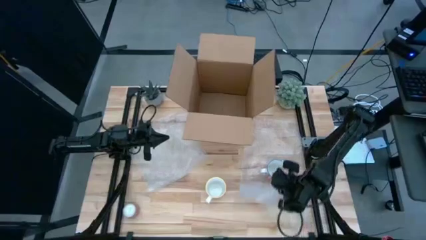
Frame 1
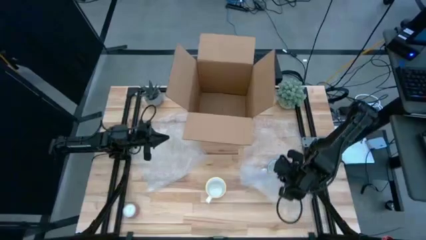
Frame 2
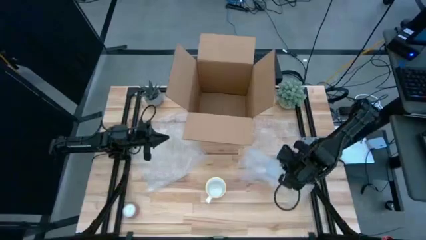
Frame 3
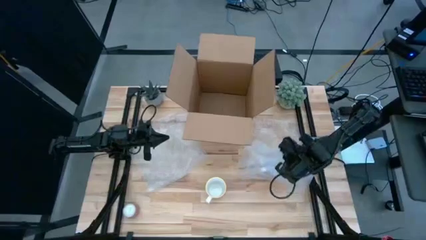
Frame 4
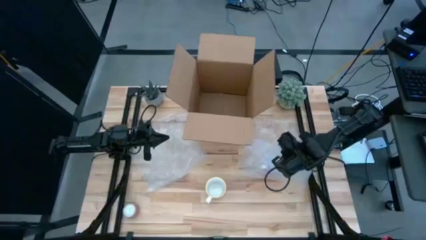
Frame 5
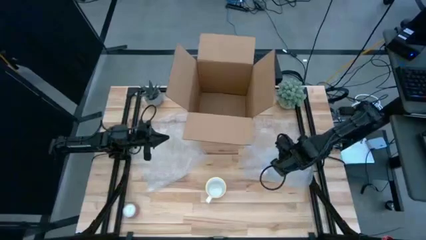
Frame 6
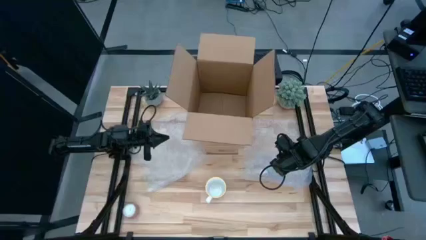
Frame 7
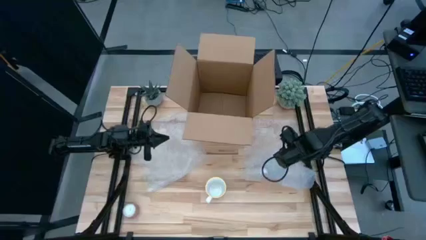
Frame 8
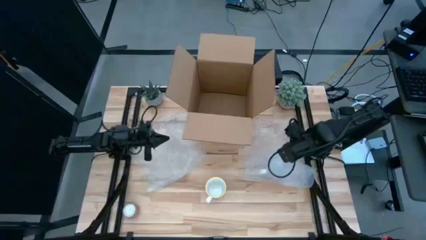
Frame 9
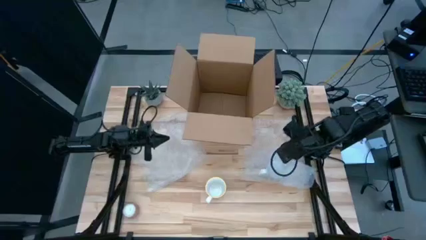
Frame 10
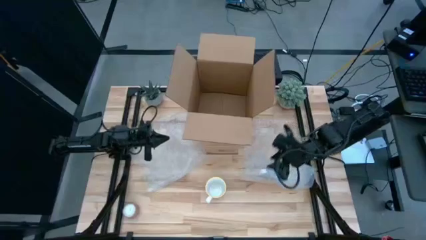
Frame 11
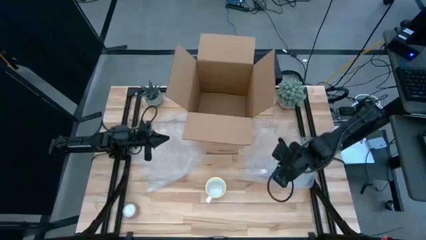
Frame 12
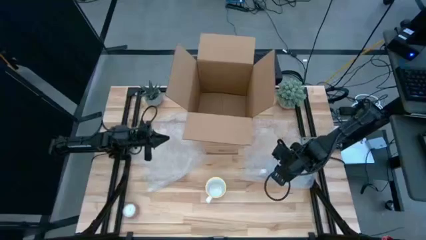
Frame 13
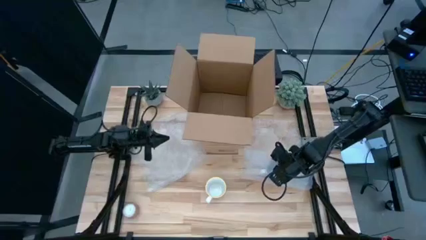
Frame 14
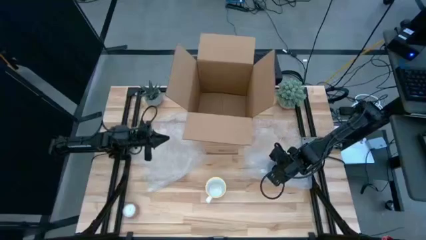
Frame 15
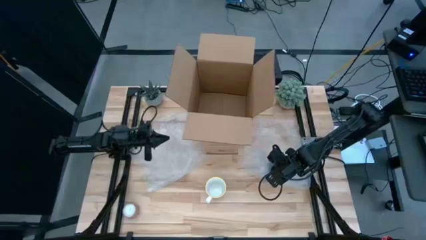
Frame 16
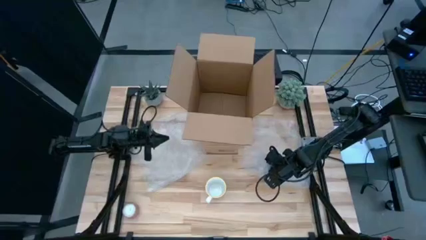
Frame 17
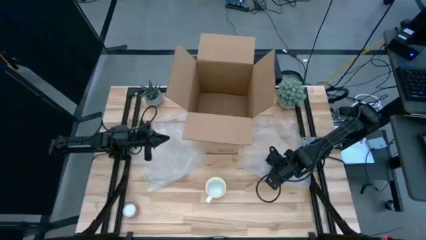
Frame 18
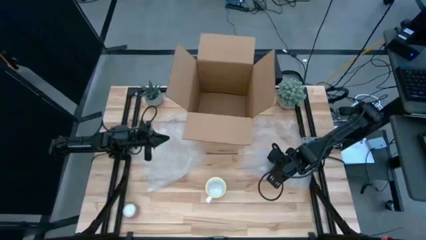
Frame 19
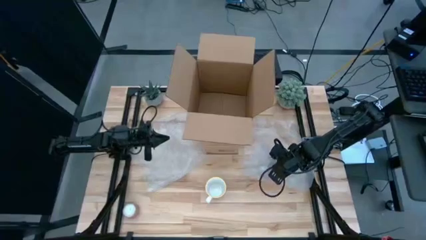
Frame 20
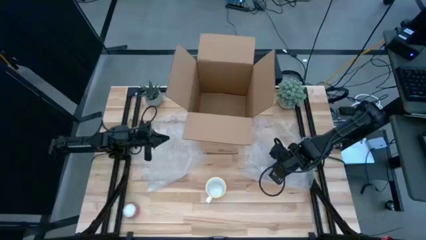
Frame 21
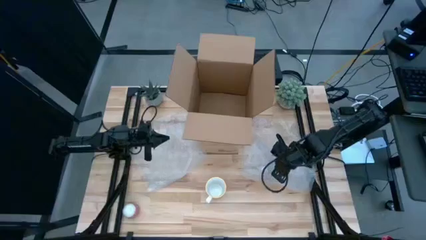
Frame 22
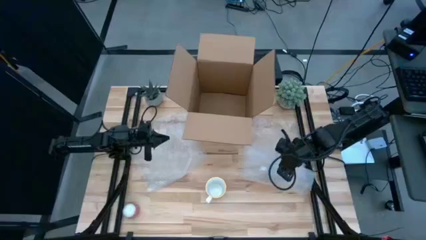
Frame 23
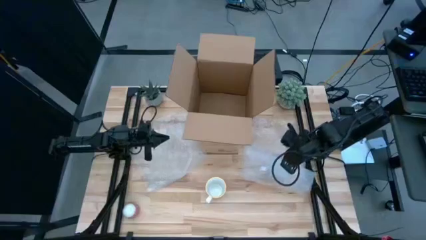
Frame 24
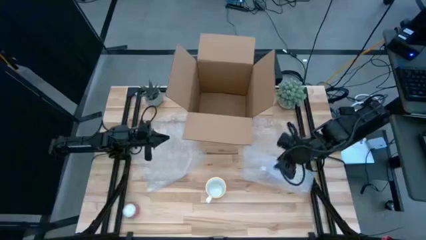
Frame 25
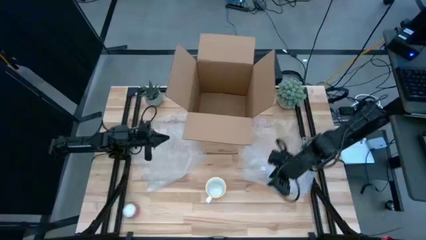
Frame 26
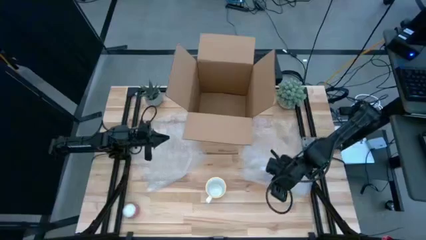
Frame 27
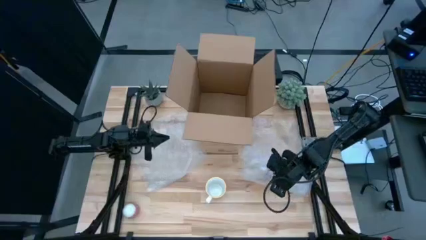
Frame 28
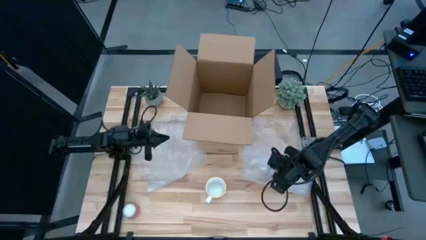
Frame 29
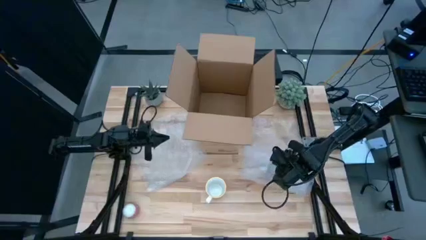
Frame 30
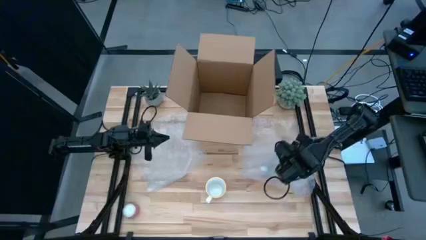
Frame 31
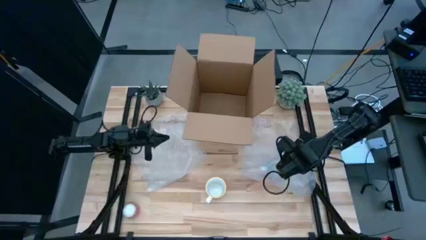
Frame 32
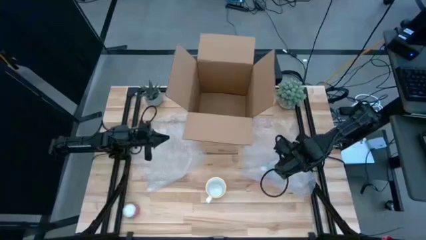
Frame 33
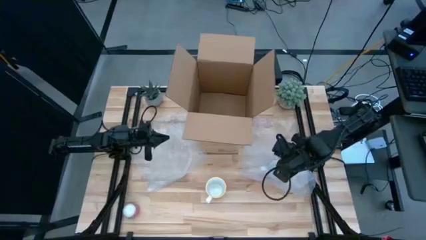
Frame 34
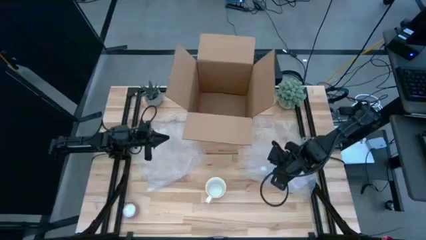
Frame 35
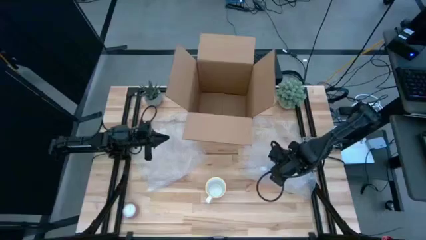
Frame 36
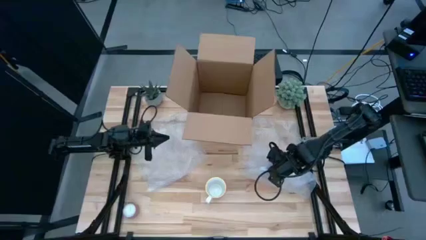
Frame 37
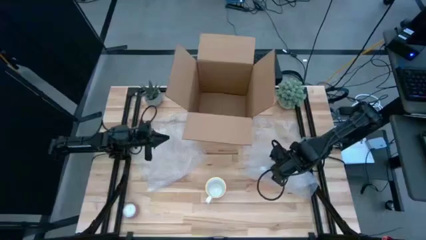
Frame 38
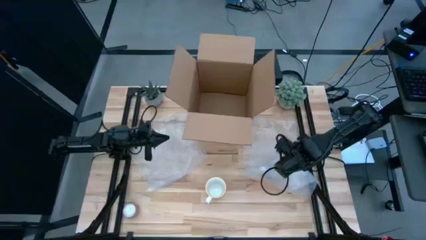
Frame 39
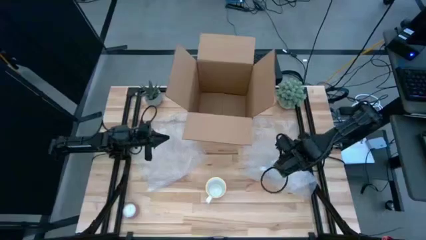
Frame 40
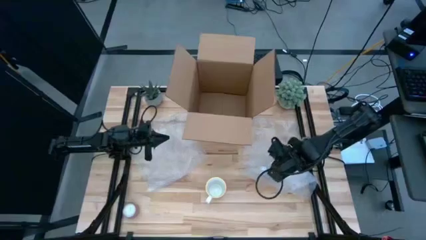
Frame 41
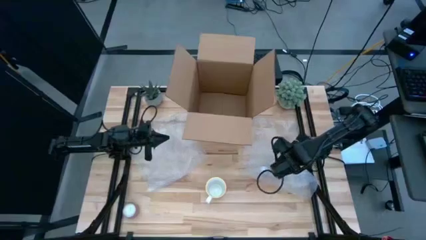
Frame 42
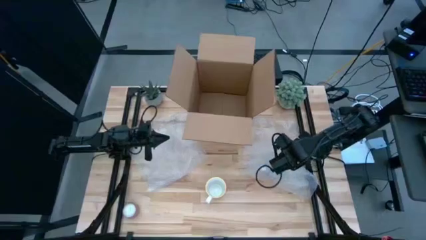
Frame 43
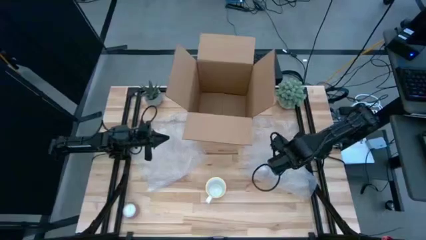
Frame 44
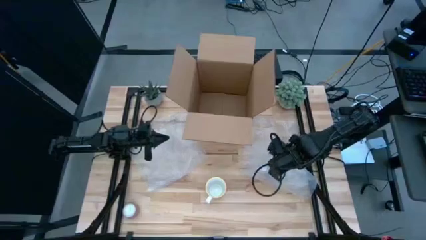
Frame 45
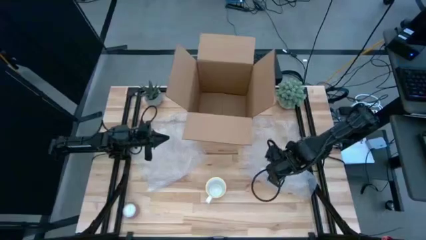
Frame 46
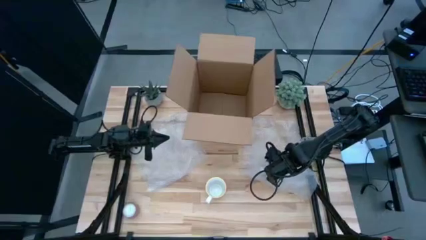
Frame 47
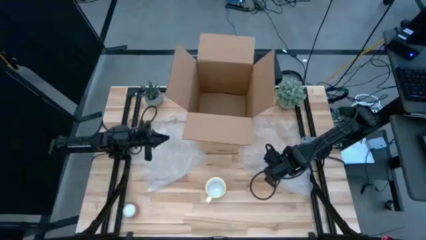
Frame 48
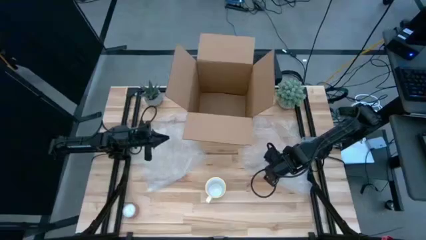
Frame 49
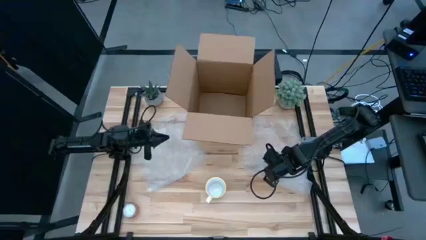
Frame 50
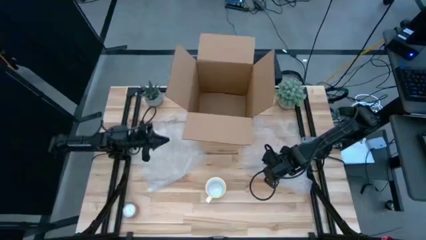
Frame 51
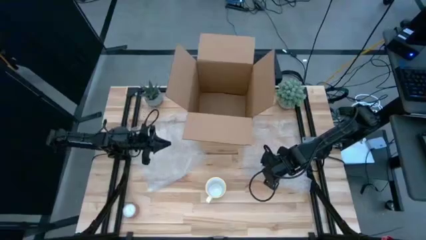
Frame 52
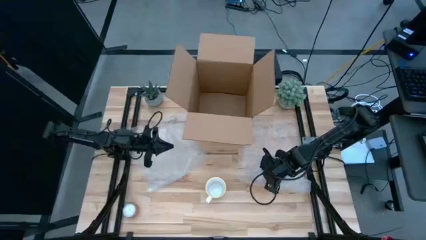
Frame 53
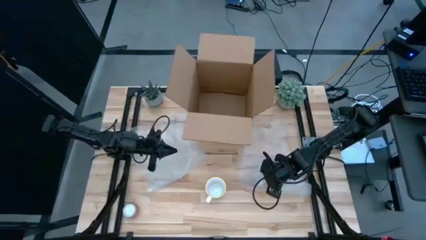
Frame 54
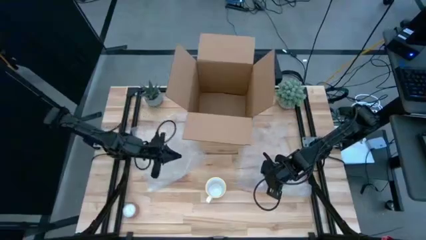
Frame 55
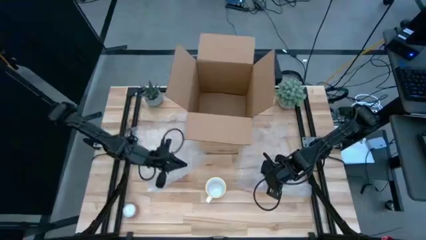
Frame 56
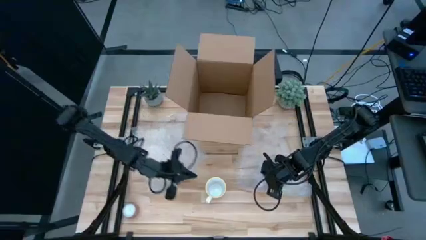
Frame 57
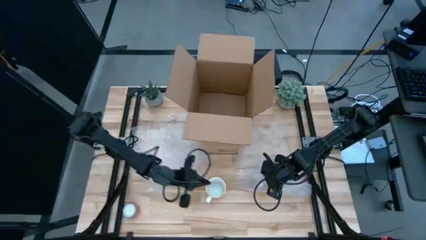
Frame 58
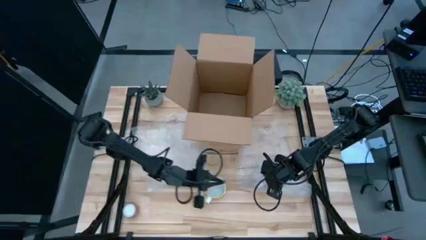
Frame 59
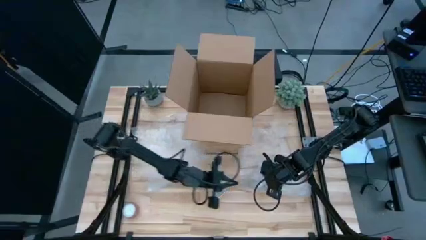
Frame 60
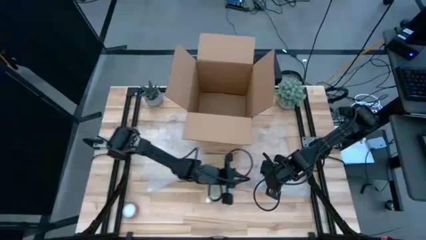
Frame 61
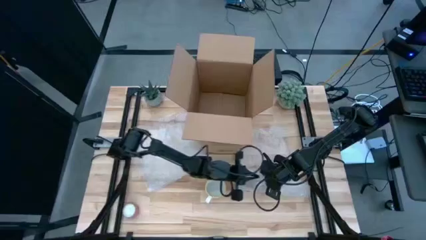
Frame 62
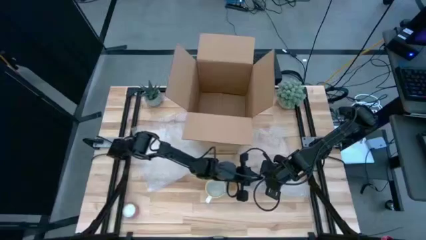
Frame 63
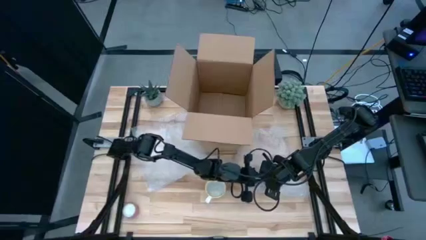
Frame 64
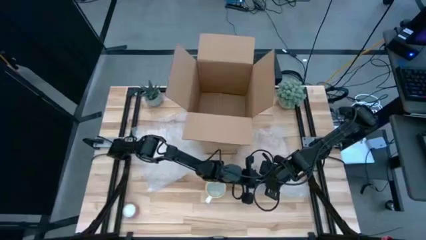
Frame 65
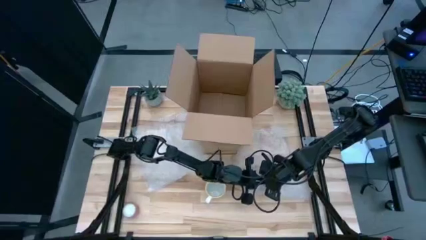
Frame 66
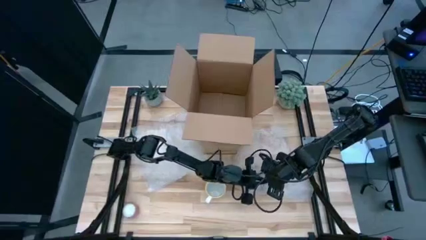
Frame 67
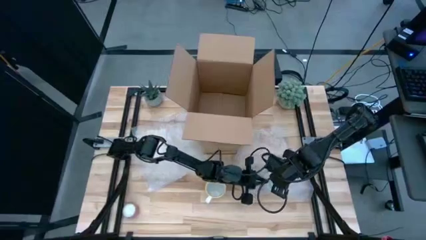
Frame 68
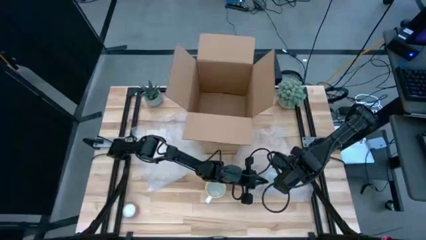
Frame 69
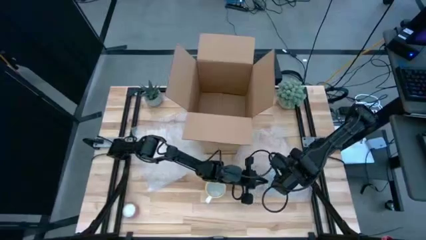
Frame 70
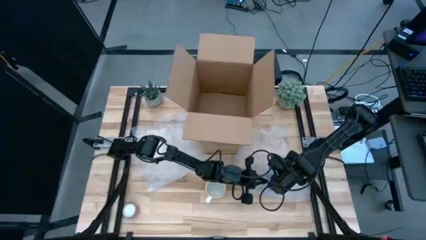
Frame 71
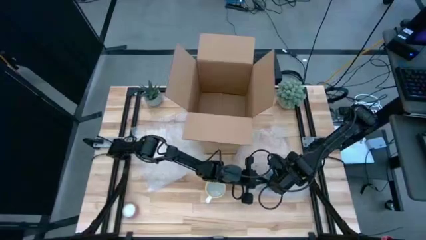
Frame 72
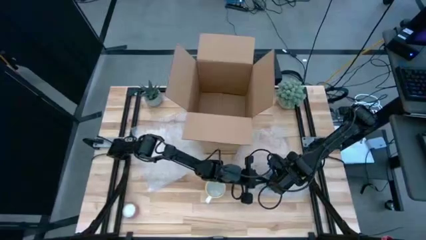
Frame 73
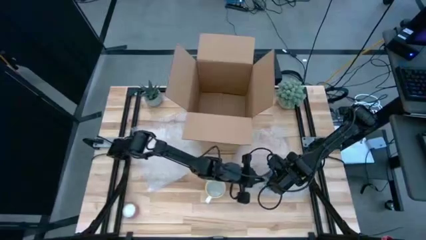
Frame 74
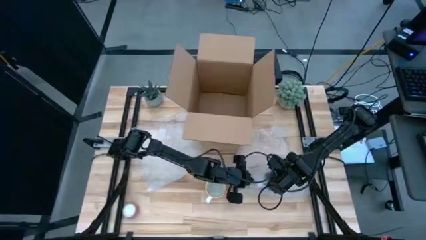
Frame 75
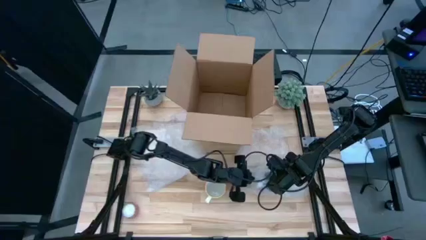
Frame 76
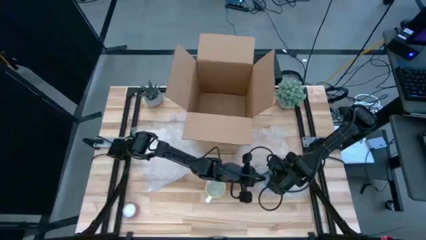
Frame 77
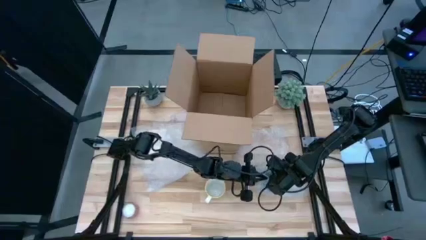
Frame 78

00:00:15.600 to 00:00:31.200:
Task: wrap mug
Wrap the red cup with the bubble wrap
